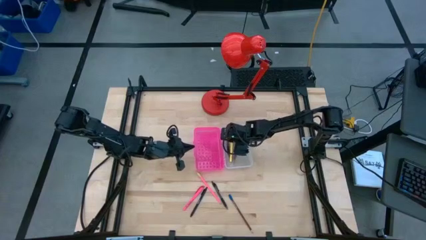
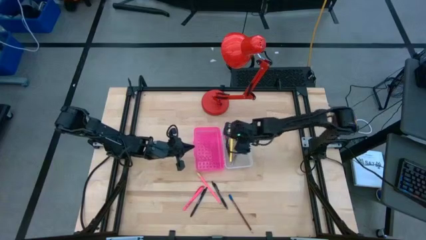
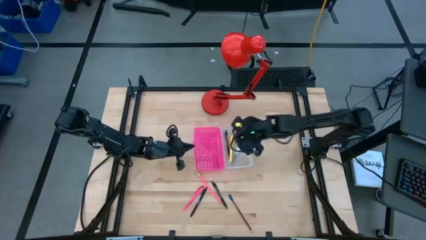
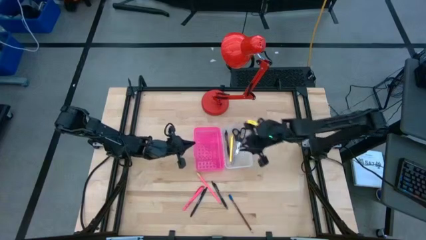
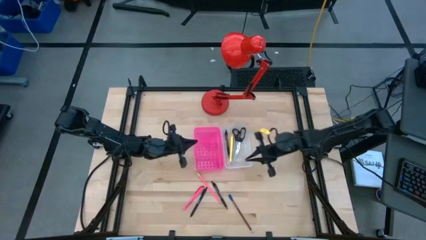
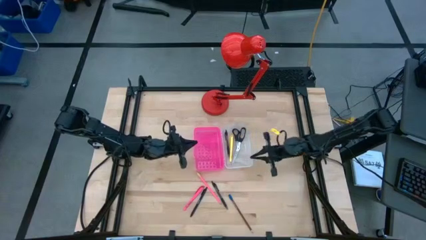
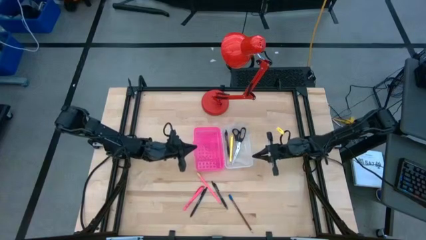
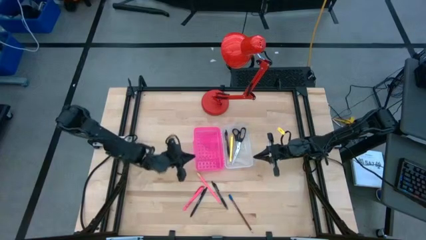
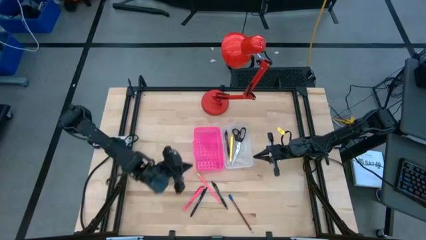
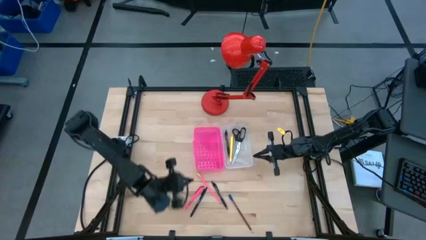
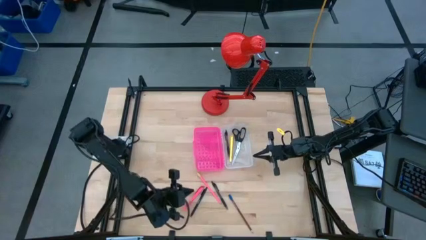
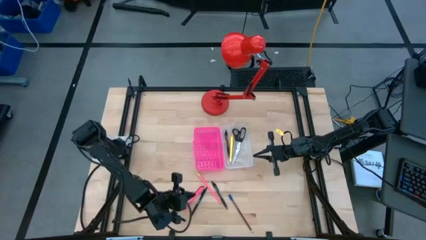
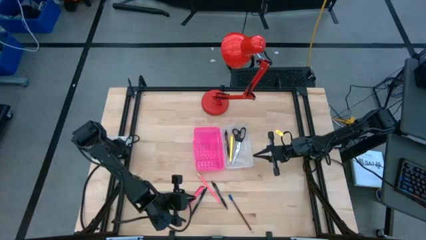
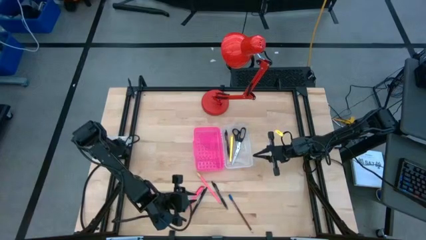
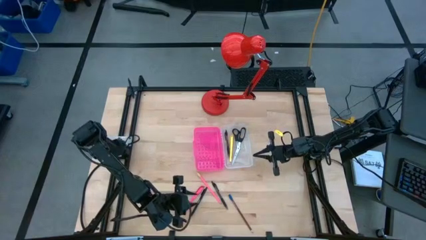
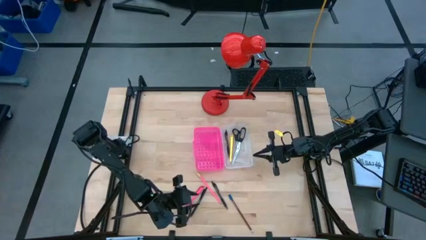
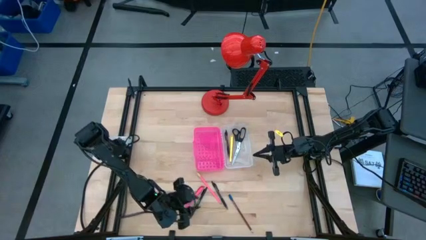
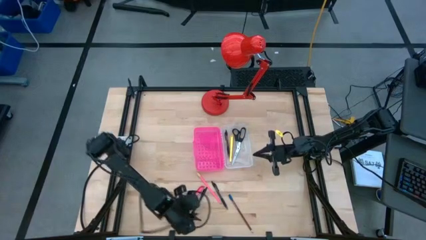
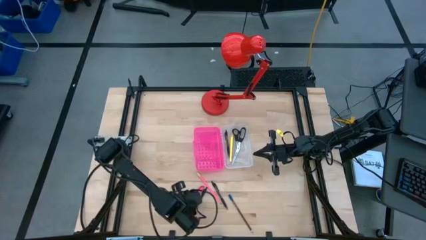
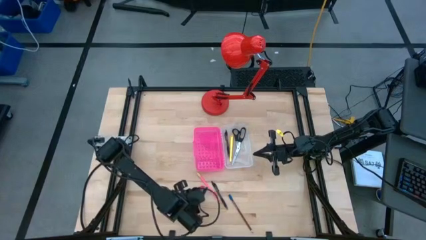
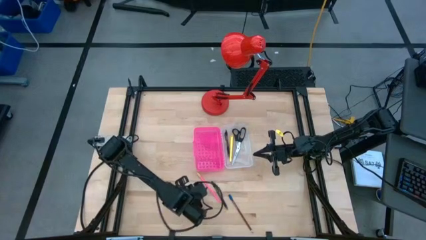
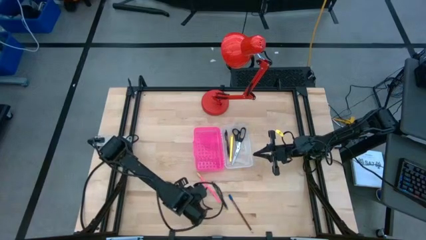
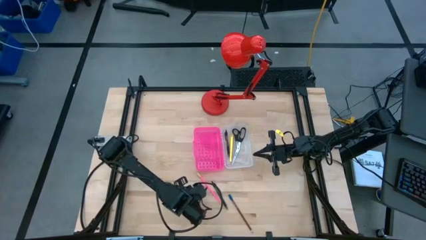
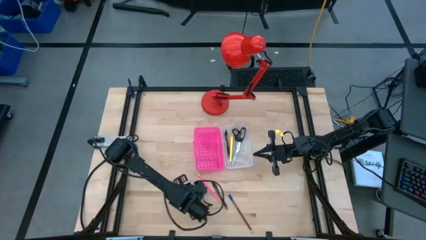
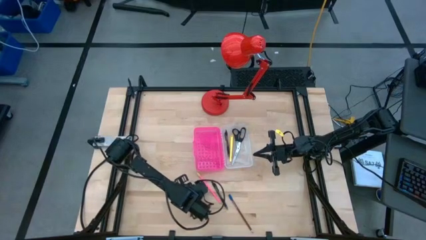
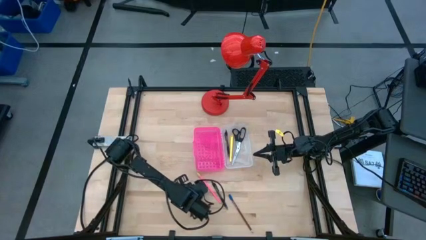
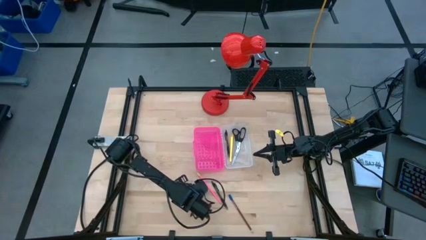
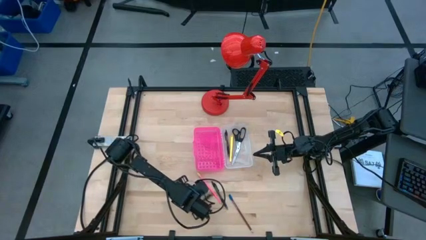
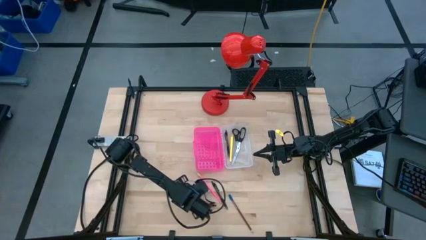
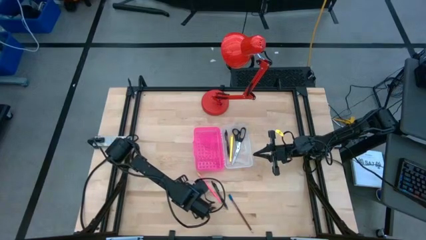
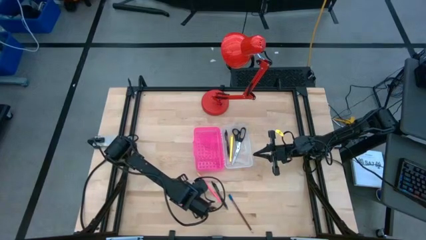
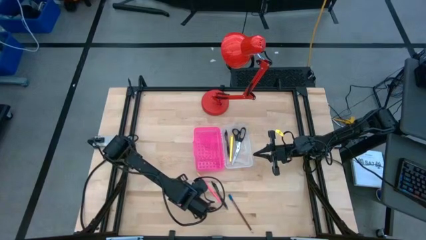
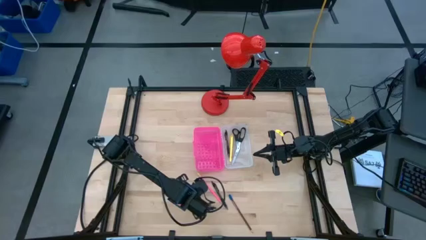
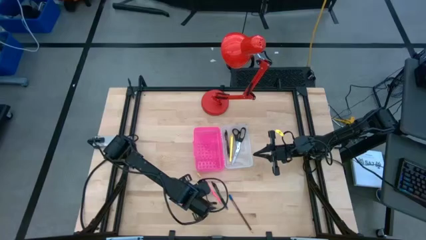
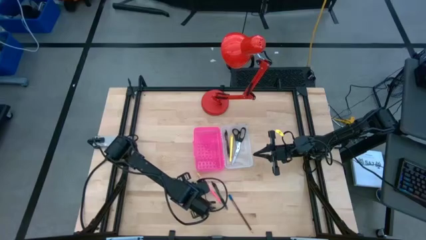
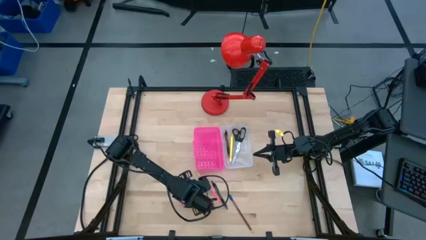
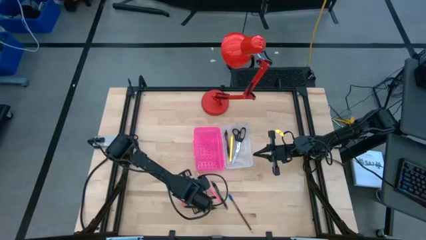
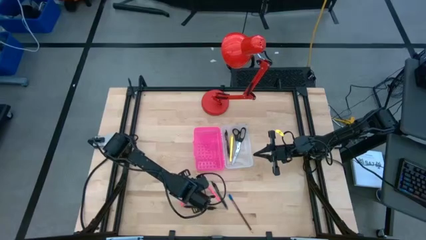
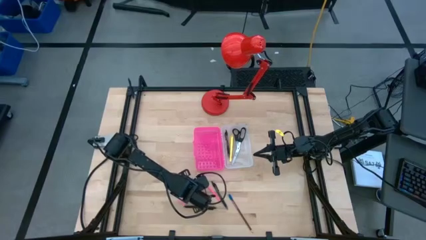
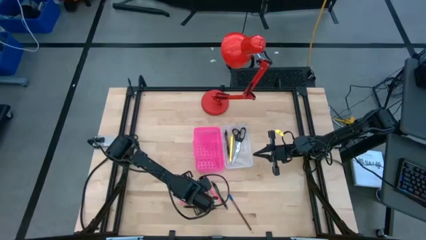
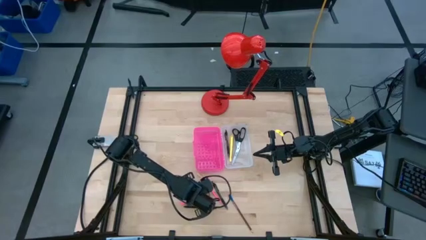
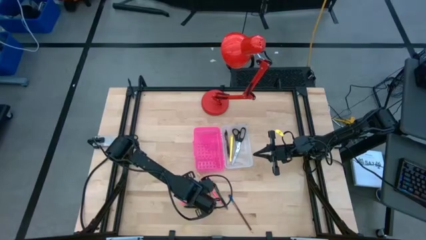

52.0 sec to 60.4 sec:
Task: Pick & place school supplies into a supply box
Put the pink pen into the pink supply box

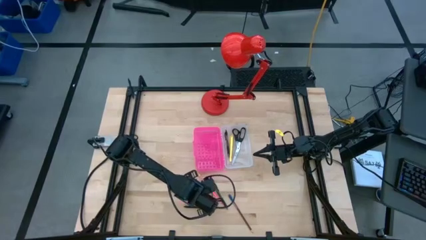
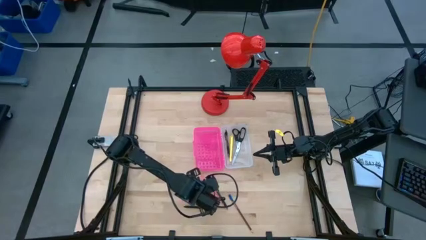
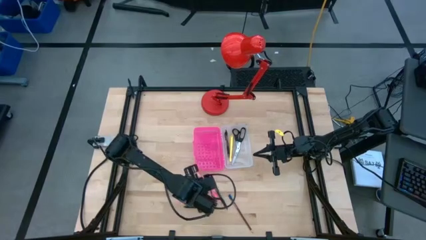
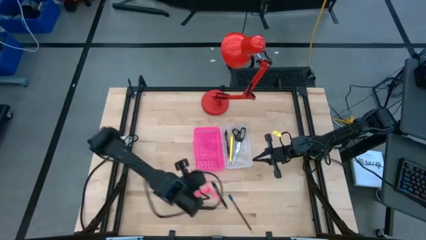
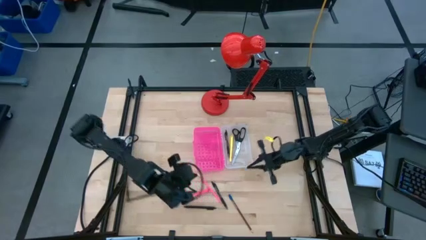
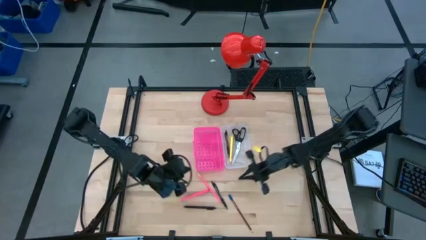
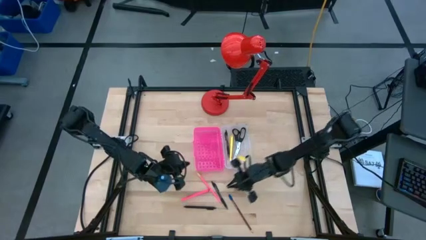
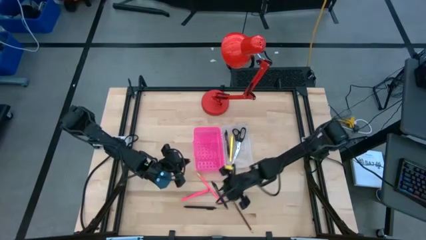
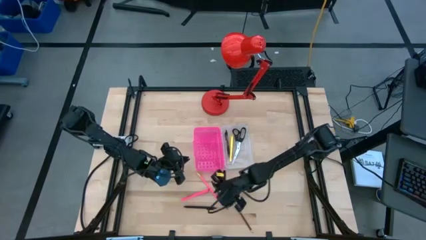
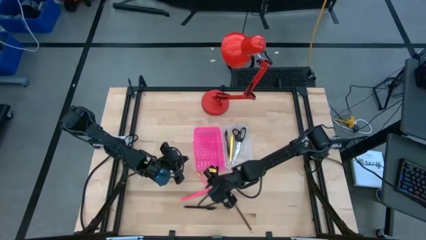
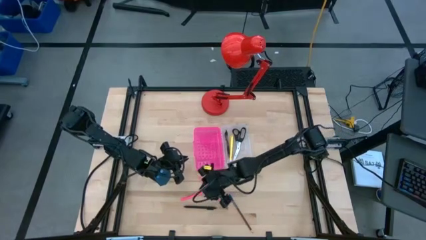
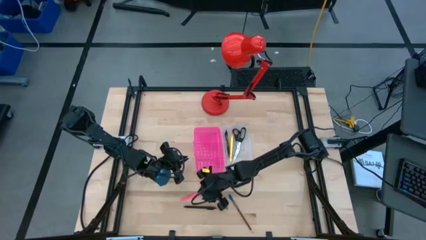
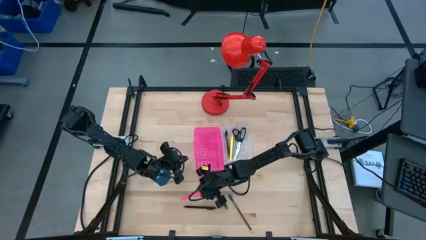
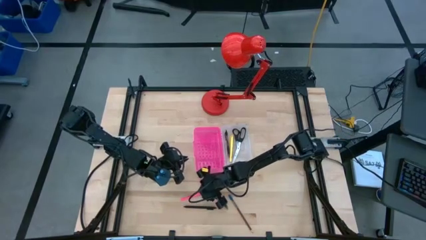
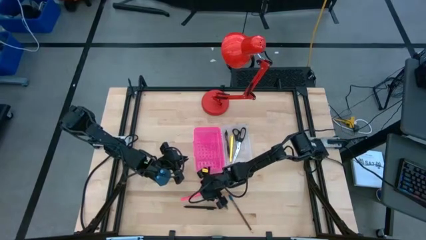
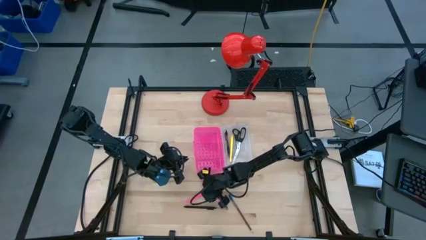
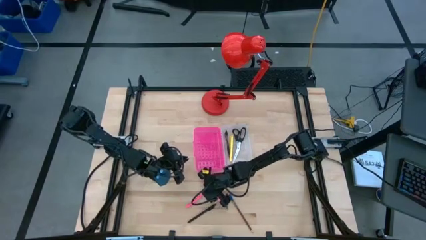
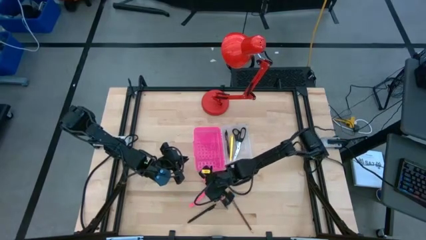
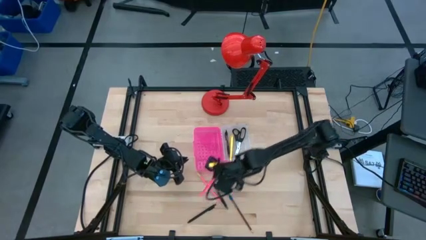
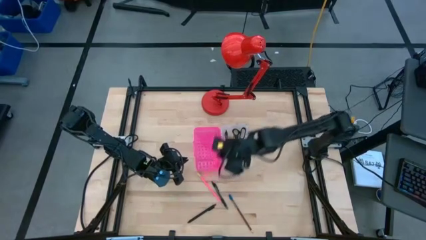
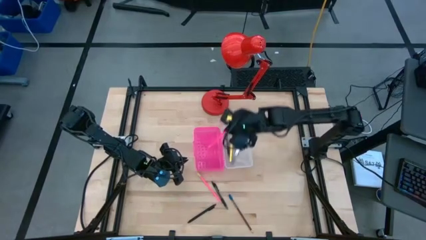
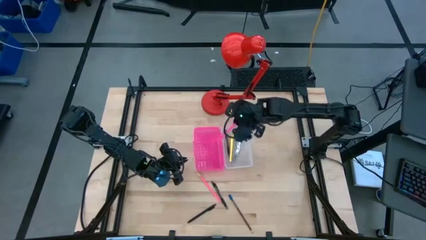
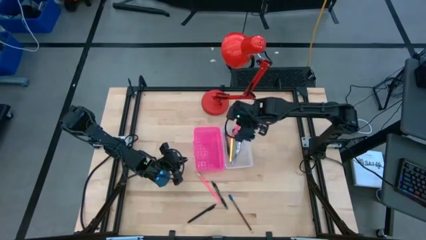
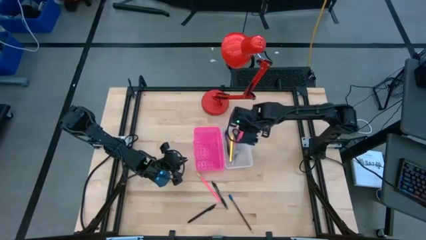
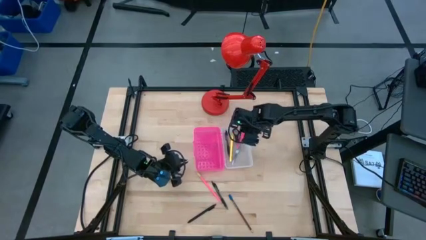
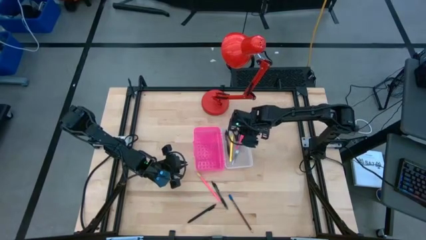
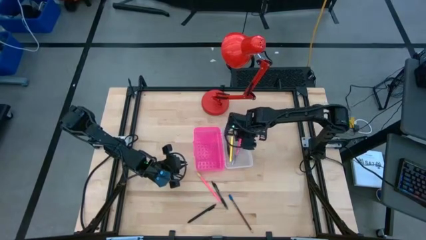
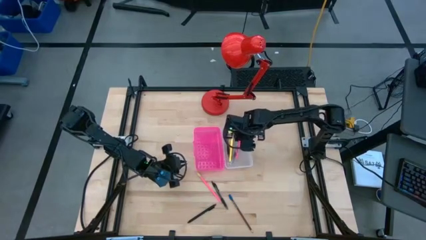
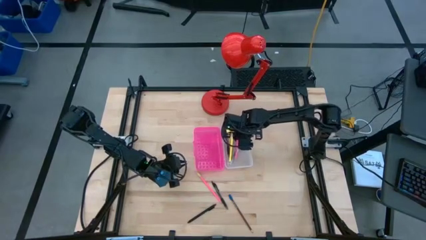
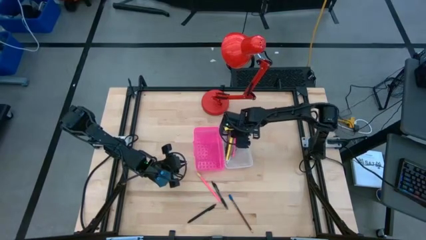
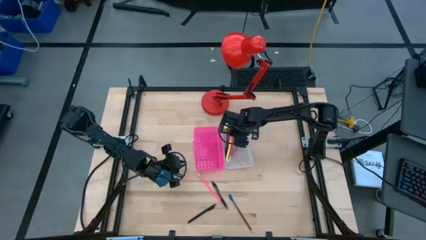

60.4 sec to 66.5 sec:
Put the pink pen into the pink supply box

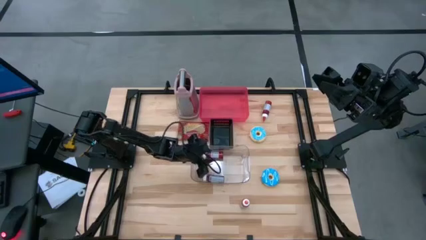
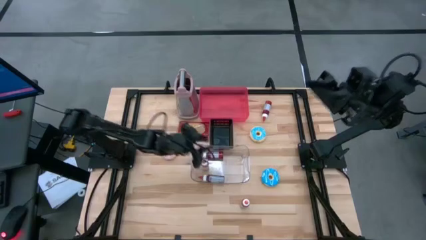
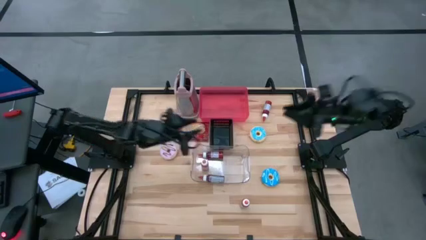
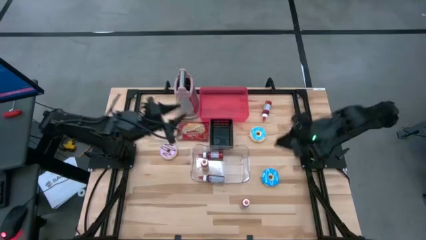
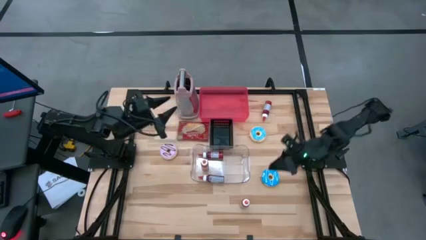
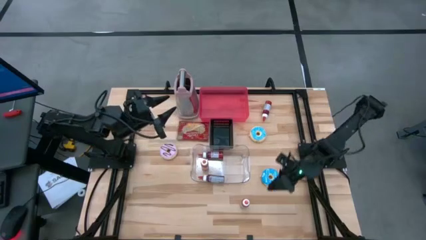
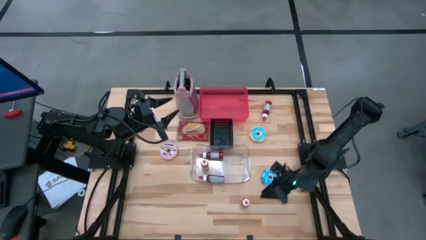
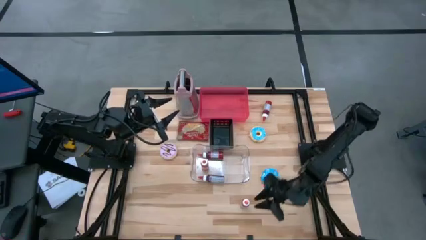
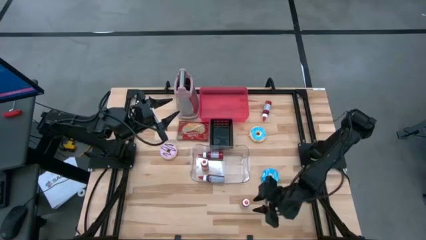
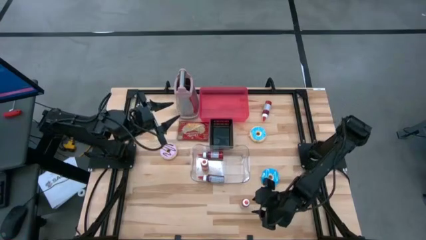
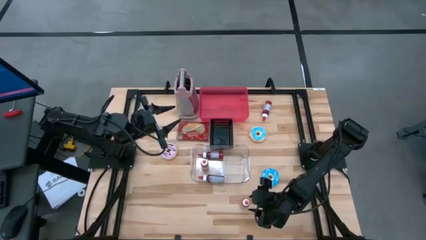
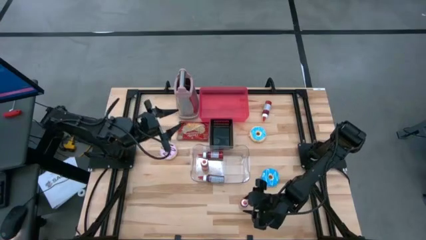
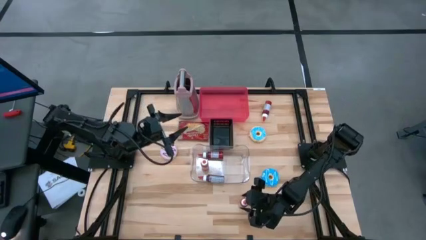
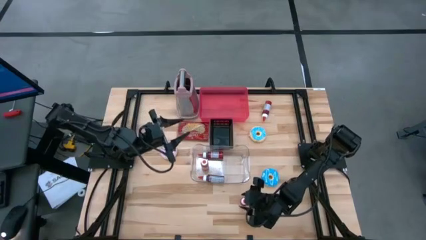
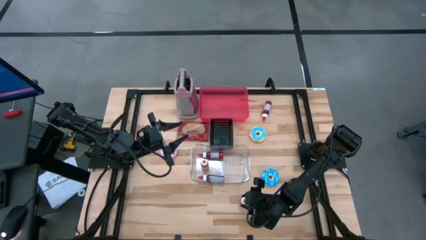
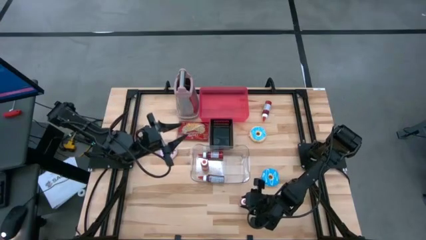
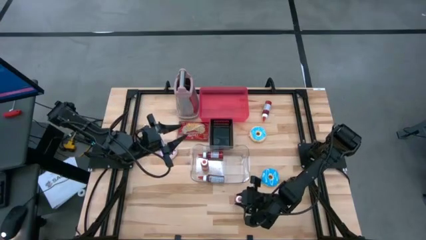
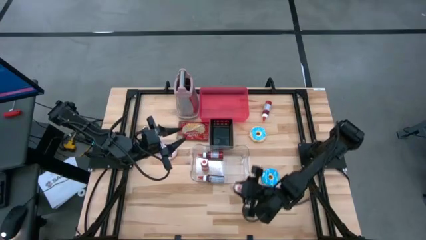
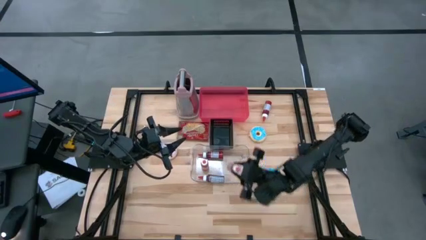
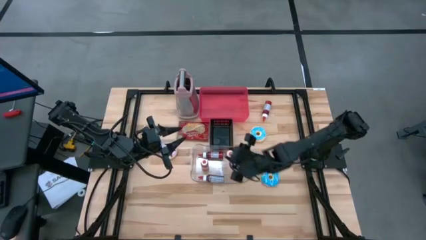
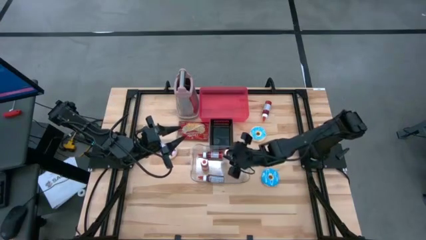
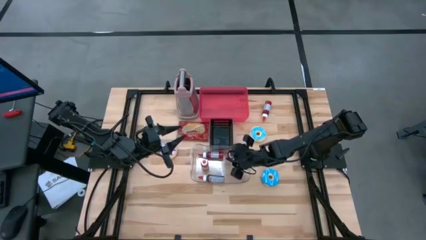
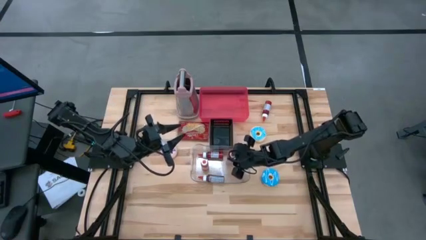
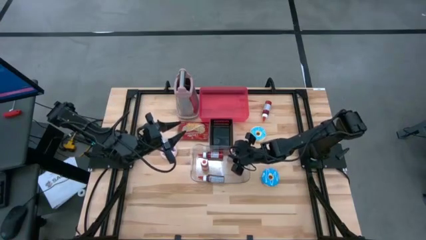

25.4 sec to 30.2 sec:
Task: Pick & Place Food Item
Put the orange food coloring bottle into the transparent bin
